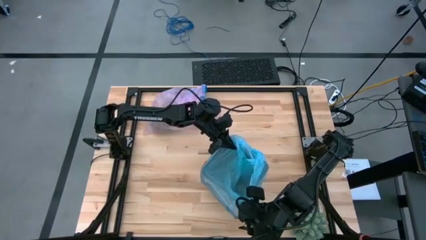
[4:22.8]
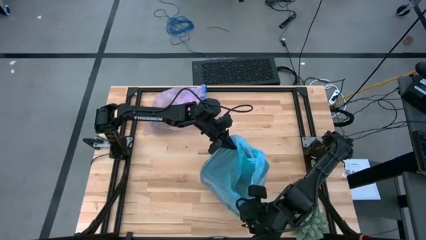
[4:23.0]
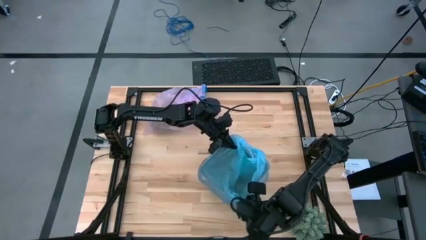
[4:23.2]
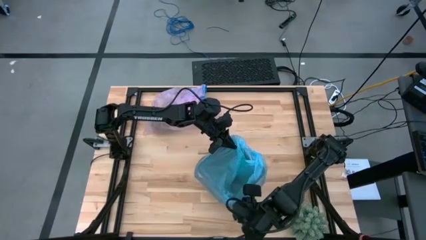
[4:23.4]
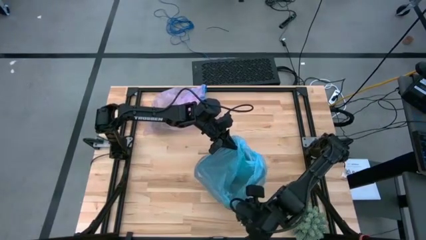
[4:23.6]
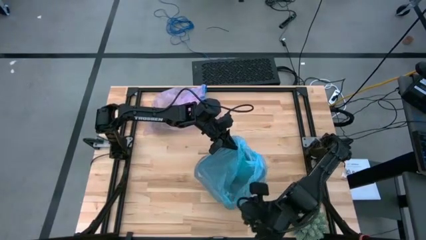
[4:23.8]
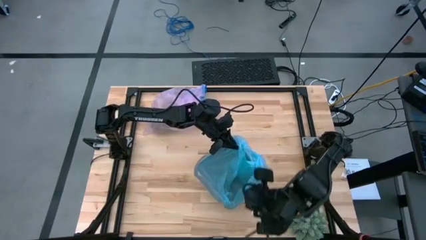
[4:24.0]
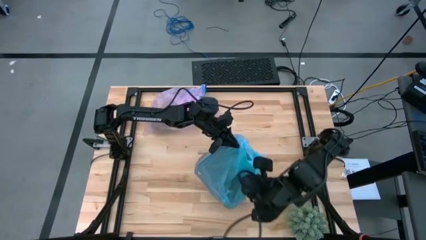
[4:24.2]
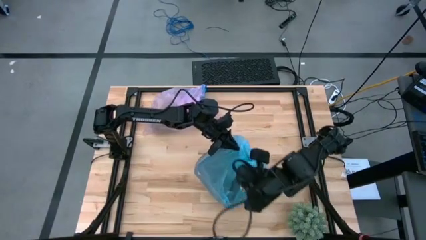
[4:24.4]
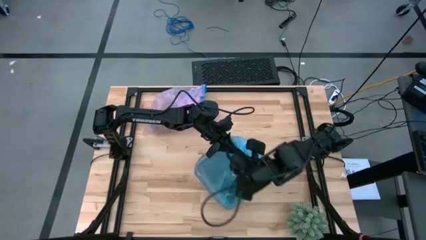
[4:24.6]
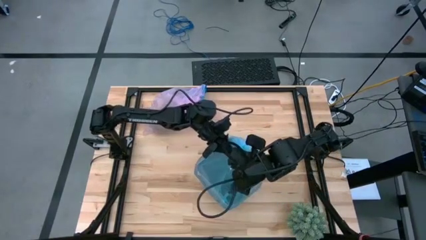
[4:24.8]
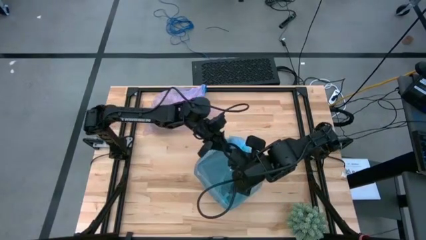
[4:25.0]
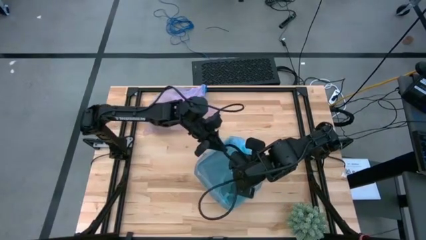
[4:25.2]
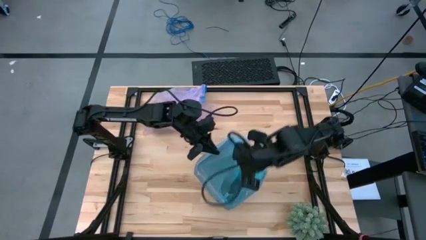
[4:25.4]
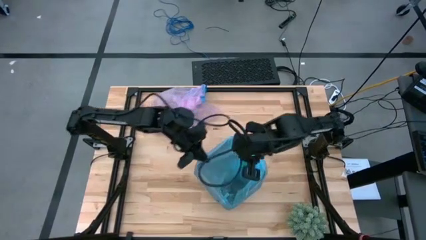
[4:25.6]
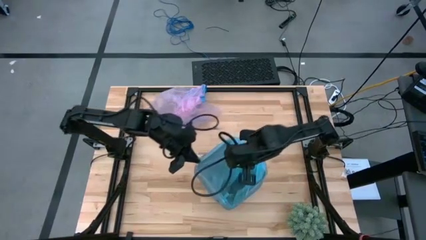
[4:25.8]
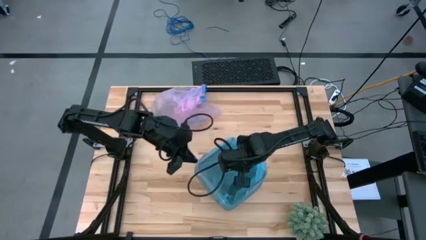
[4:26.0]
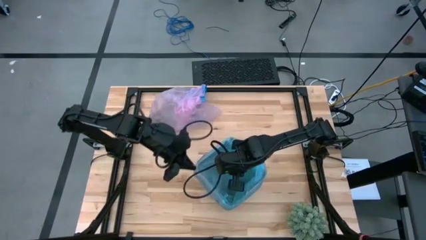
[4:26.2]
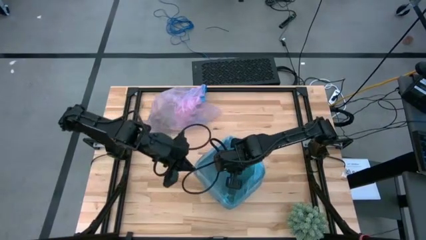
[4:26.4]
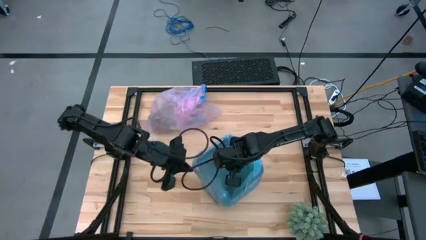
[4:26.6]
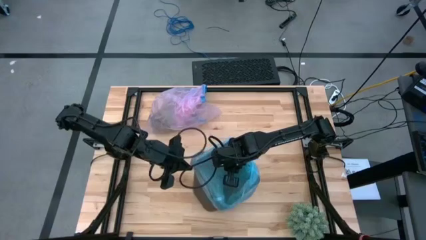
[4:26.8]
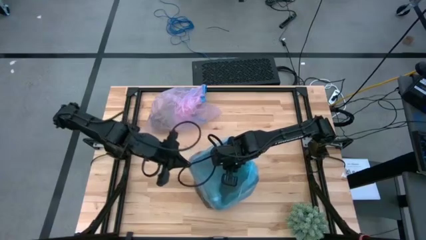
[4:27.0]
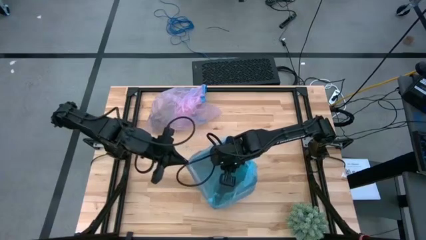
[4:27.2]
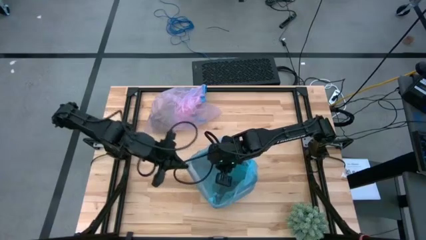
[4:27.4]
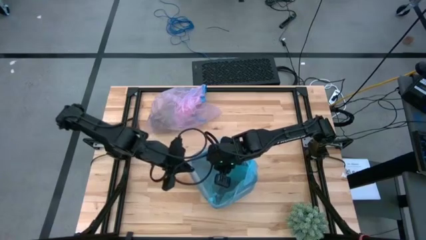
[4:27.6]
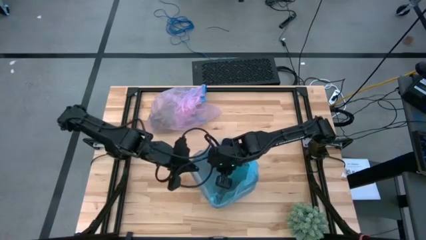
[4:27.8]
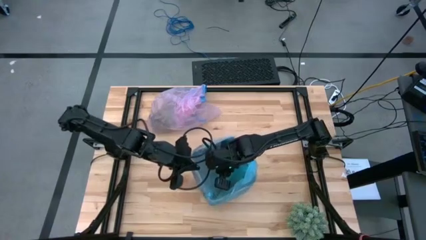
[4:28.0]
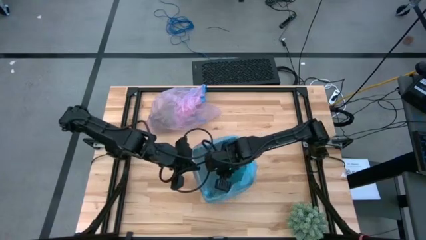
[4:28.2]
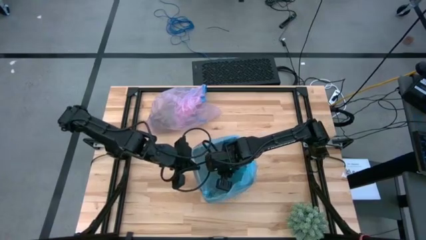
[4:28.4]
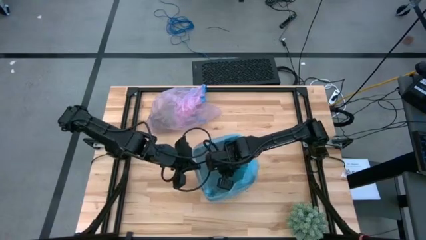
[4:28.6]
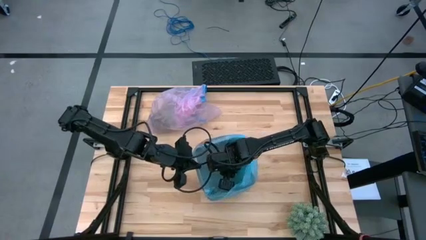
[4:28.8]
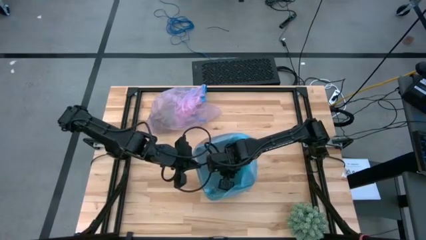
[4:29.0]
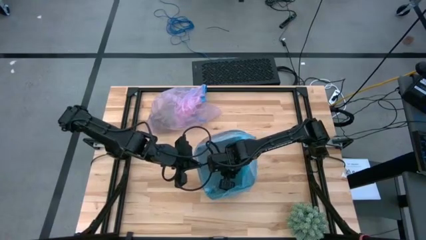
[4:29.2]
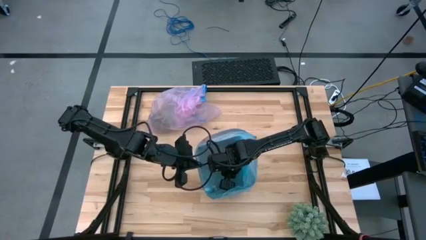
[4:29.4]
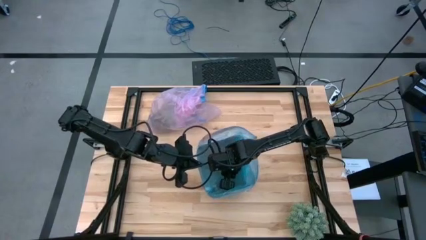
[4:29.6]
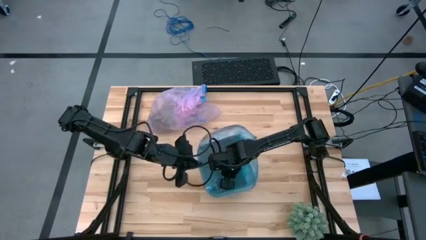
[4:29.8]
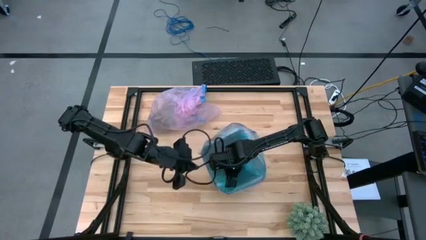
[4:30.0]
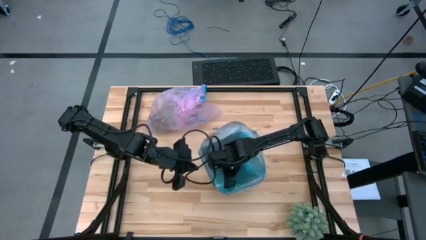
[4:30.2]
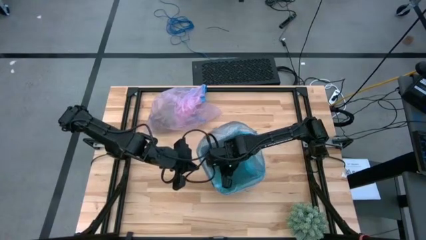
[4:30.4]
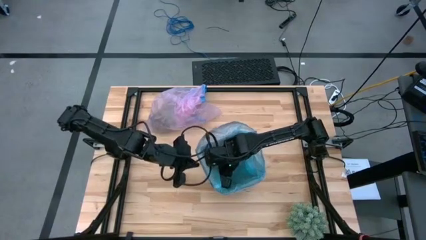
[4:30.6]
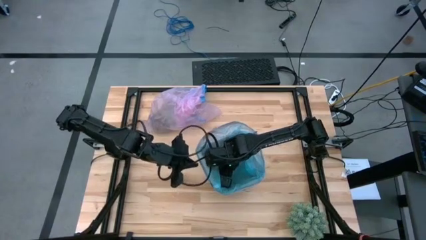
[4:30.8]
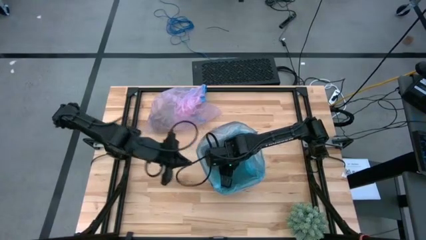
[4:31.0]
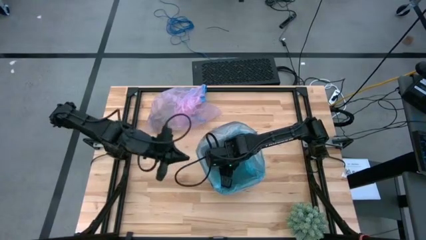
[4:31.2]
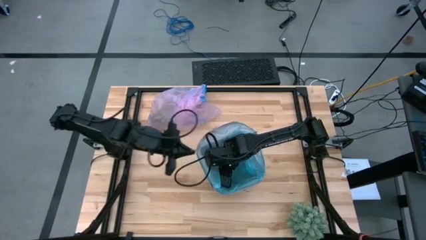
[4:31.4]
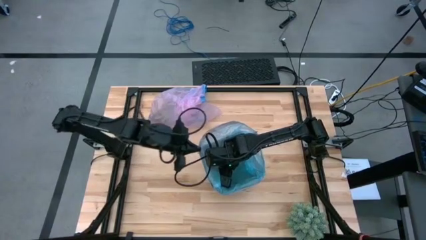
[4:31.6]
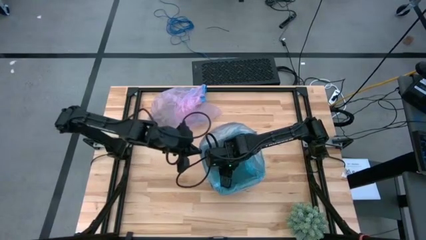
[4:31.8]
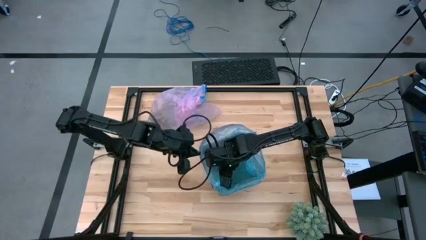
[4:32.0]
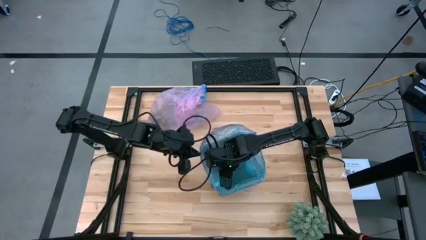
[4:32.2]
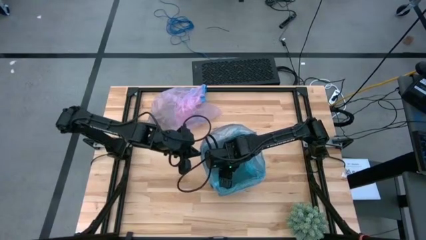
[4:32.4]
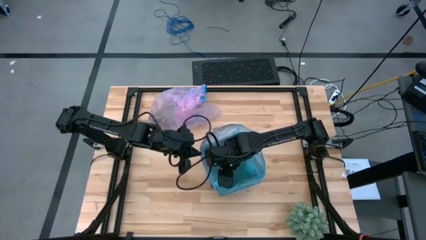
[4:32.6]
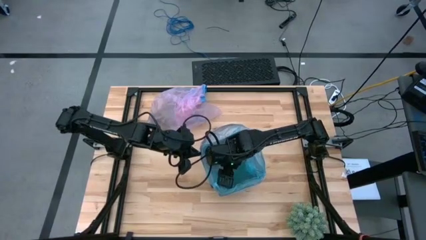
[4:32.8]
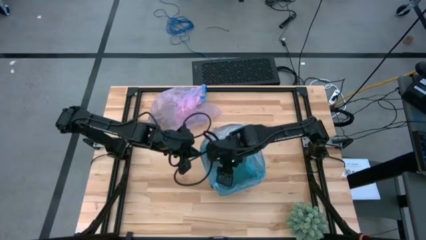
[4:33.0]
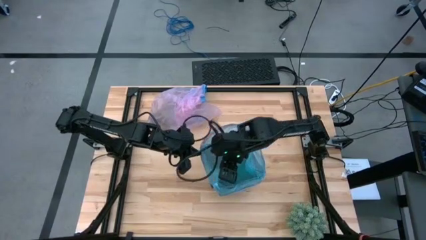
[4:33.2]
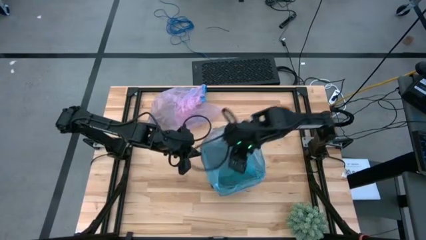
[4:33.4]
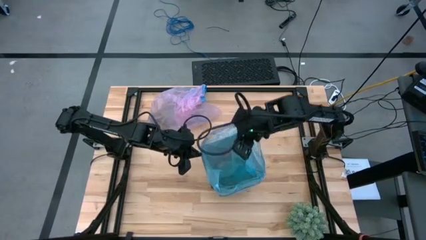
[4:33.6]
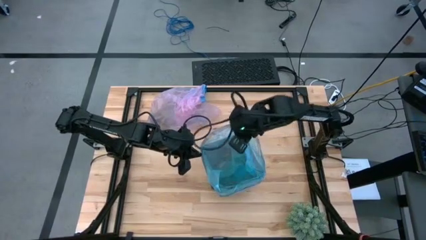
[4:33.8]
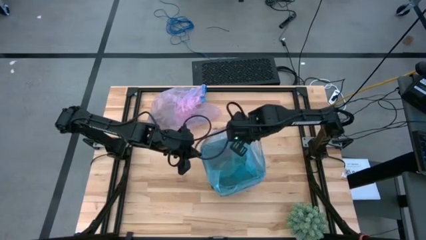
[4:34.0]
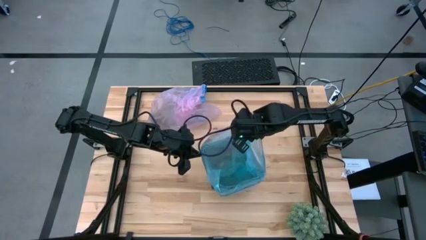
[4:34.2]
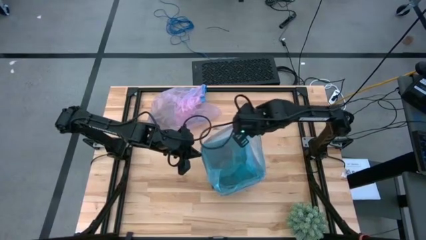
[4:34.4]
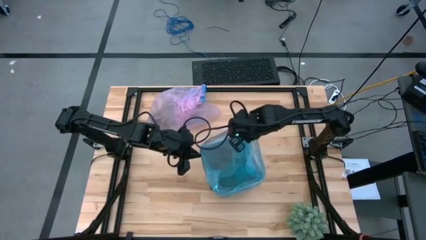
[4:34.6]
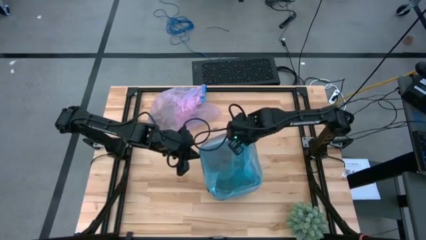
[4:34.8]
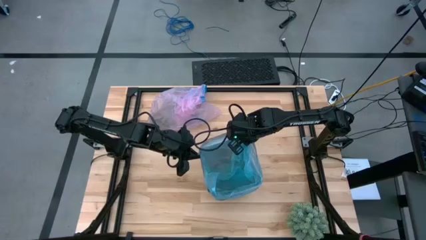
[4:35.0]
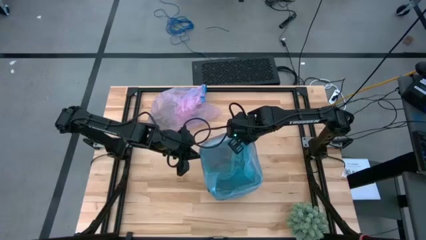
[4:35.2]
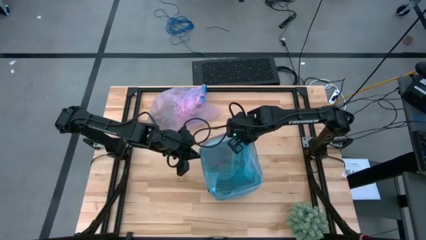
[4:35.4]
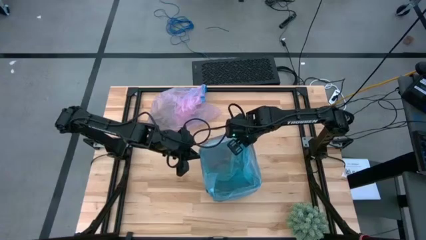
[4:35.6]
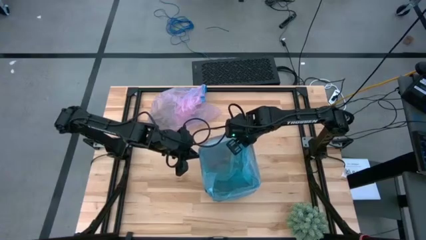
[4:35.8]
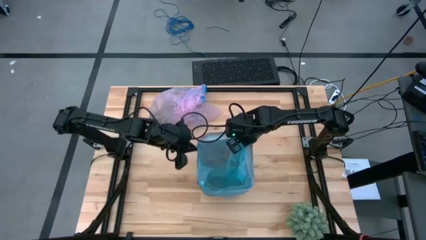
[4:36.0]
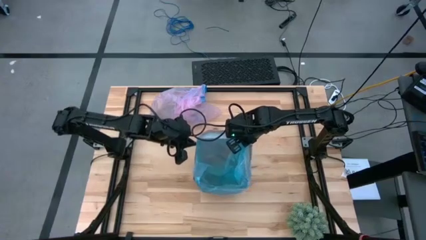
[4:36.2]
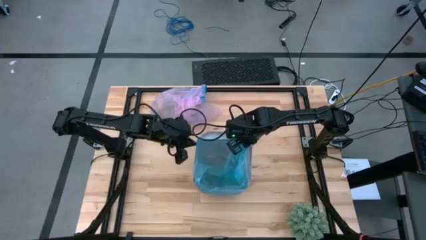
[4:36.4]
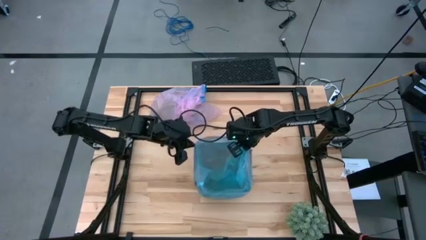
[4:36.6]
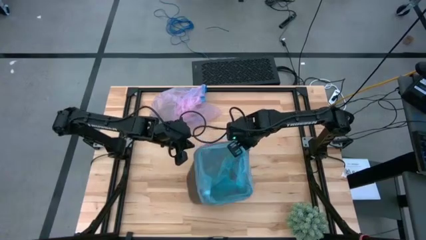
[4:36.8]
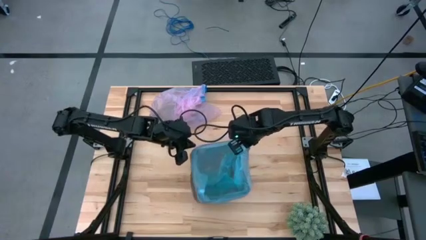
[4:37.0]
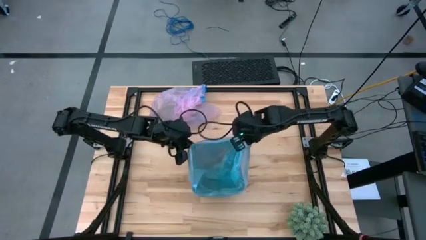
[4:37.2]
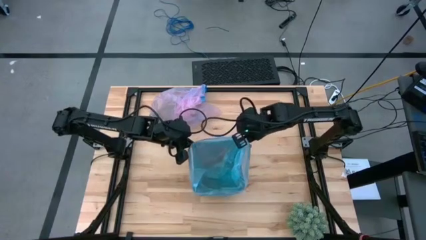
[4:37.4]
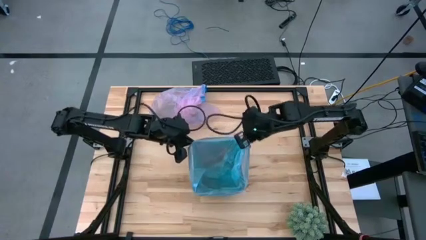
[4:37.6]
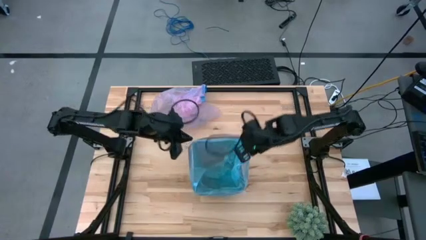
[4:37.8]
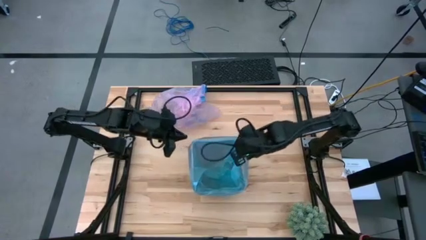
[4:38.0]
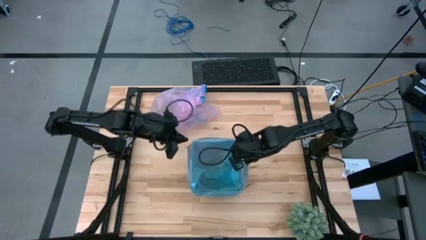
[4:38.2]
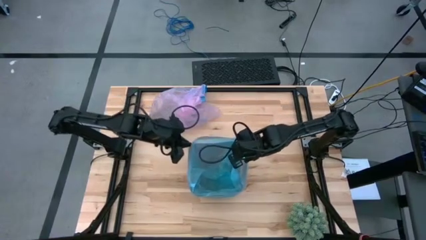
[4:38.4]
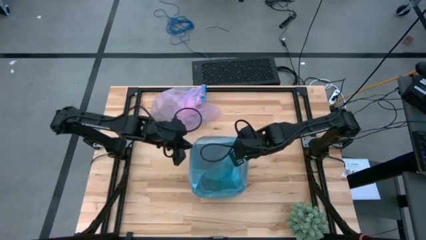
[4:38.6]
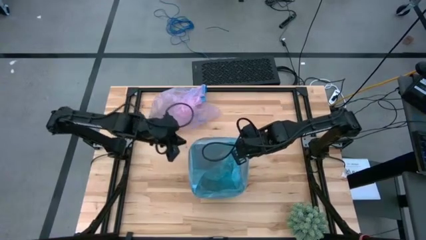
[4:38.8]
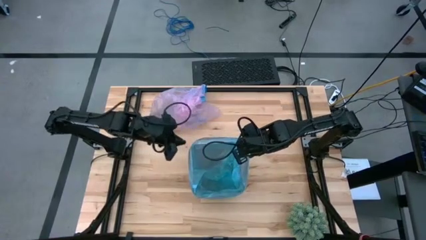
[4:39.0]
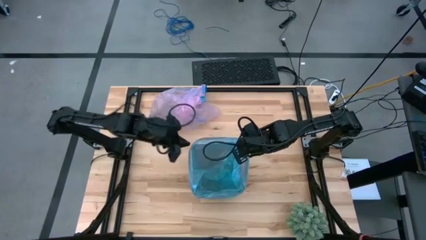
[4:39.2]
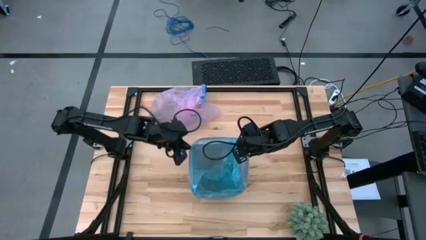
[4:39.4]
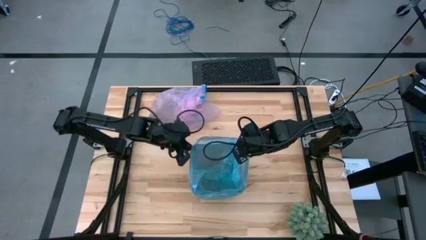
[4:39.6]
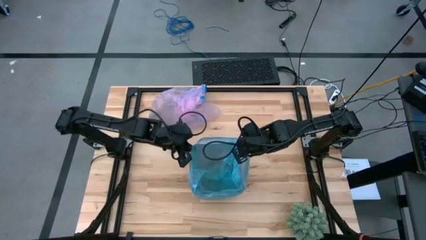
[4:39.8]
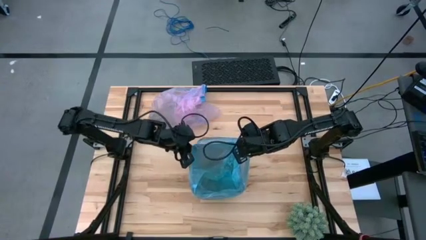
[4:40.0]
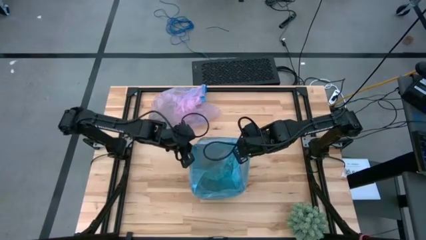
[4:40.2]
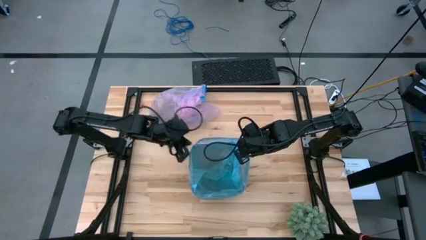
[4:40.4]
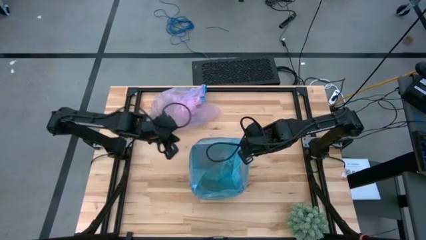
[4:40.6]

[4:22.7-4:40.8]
Task: place trash/remove bag and relplace
Insert the new trash bag into the trash bin
